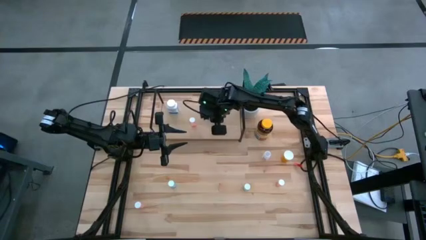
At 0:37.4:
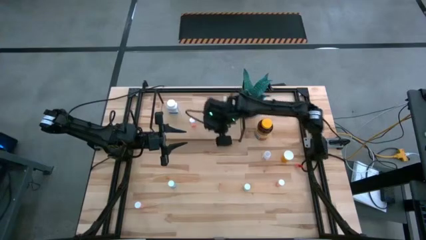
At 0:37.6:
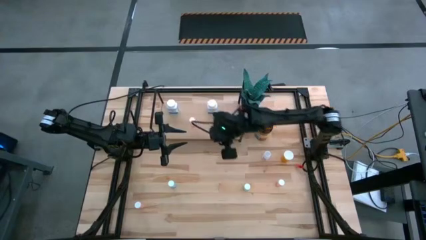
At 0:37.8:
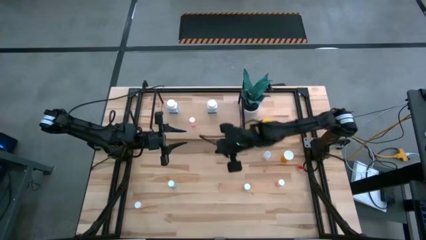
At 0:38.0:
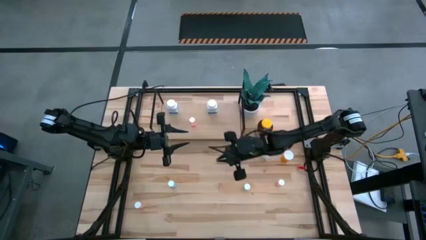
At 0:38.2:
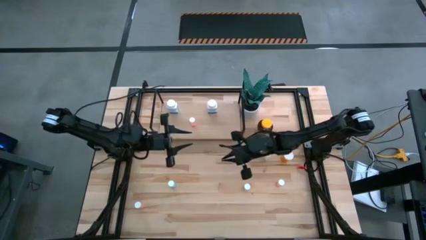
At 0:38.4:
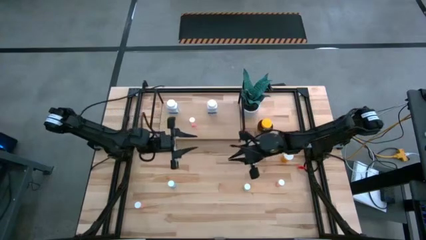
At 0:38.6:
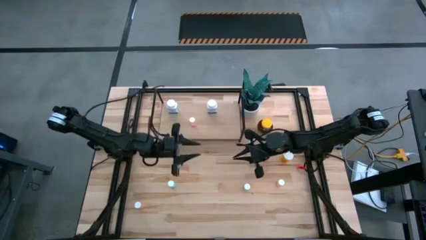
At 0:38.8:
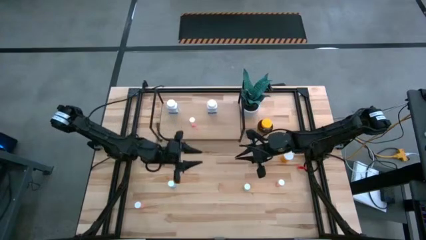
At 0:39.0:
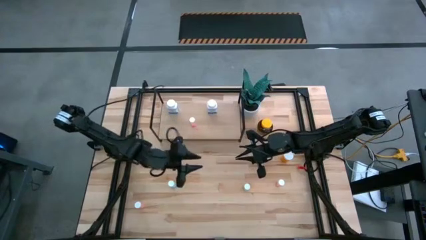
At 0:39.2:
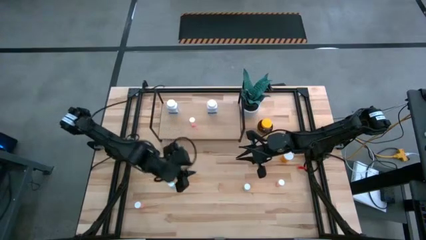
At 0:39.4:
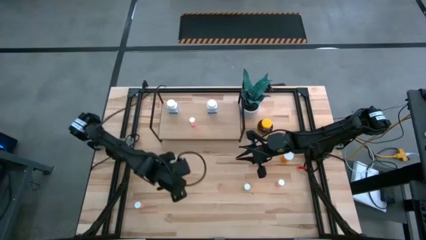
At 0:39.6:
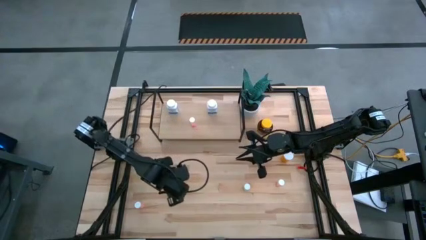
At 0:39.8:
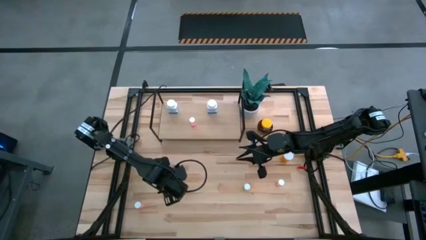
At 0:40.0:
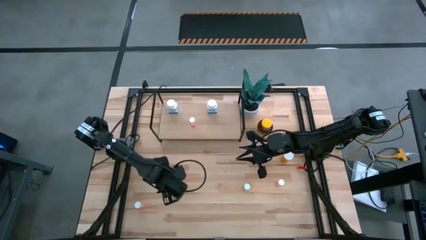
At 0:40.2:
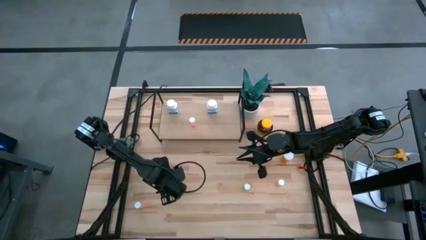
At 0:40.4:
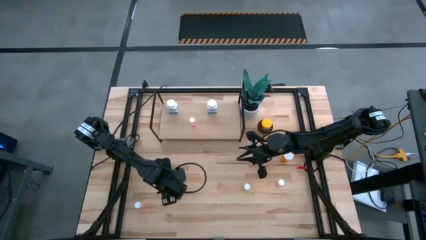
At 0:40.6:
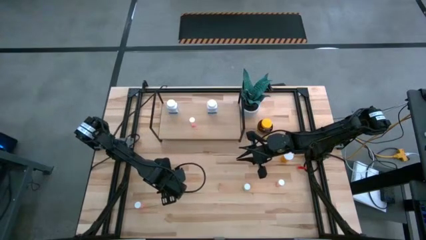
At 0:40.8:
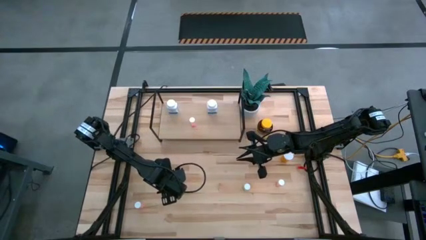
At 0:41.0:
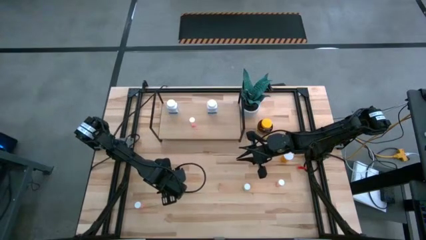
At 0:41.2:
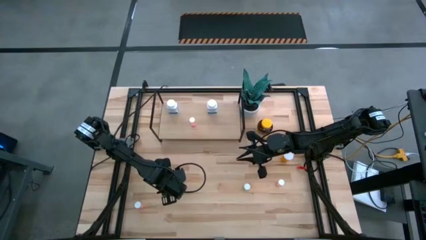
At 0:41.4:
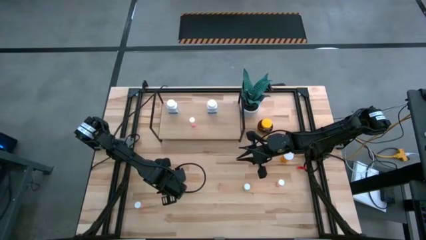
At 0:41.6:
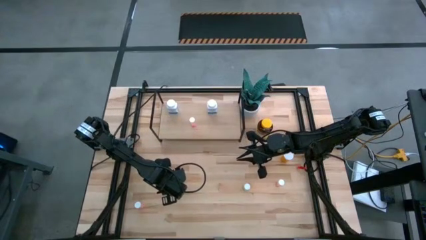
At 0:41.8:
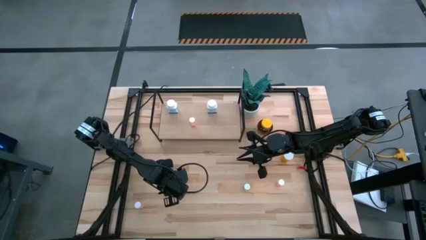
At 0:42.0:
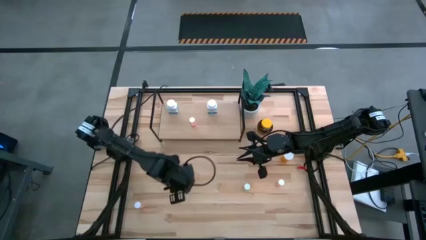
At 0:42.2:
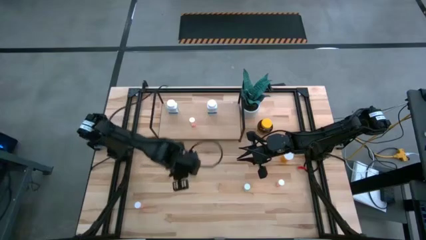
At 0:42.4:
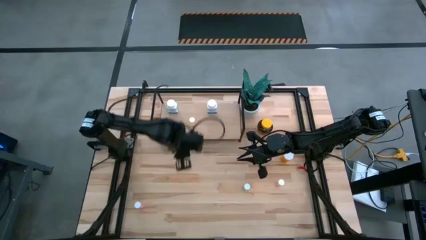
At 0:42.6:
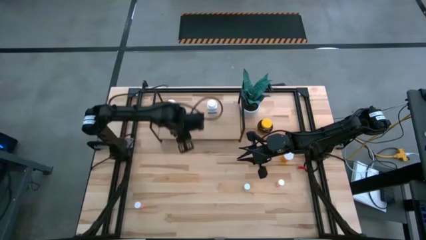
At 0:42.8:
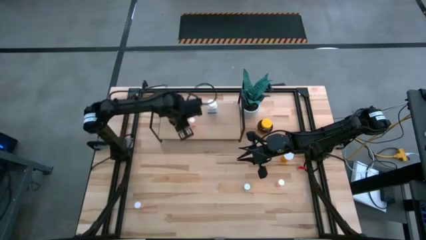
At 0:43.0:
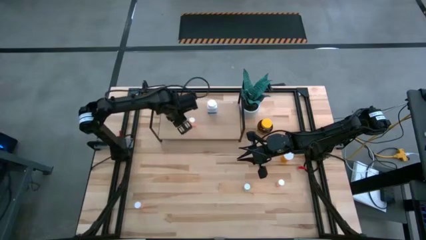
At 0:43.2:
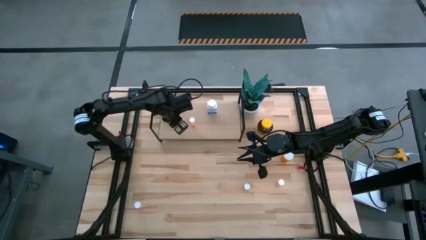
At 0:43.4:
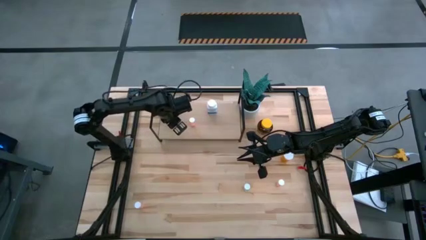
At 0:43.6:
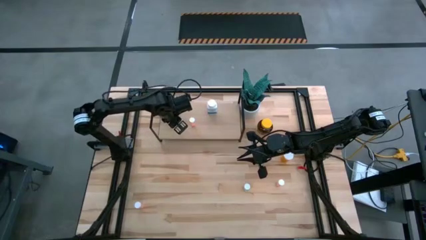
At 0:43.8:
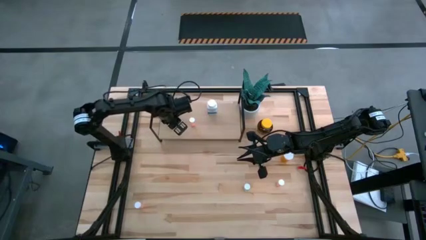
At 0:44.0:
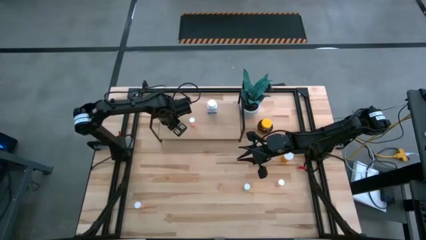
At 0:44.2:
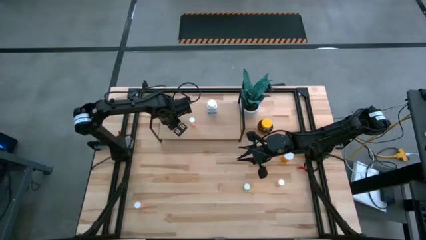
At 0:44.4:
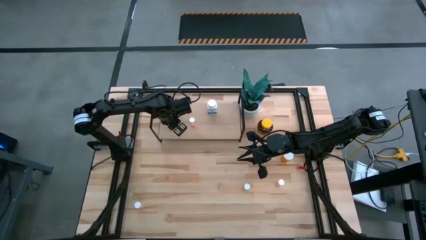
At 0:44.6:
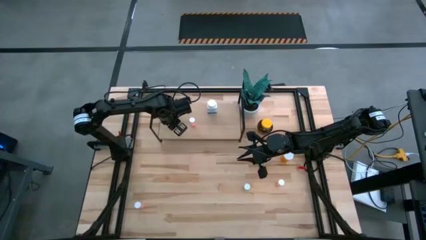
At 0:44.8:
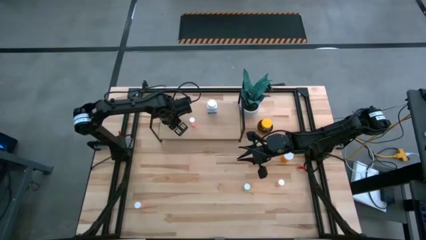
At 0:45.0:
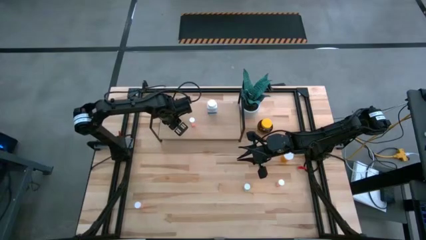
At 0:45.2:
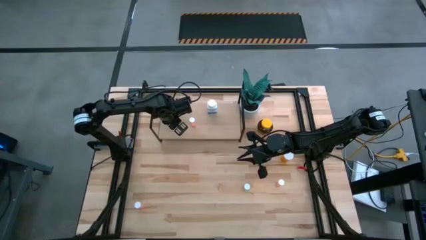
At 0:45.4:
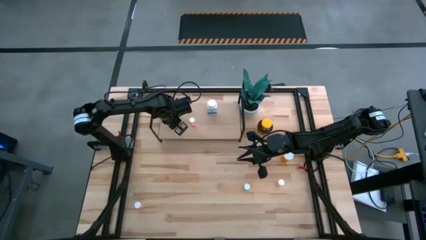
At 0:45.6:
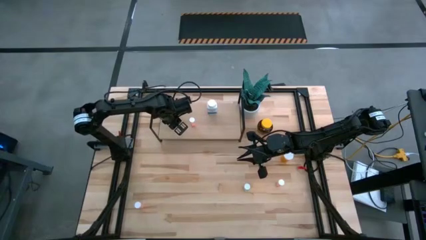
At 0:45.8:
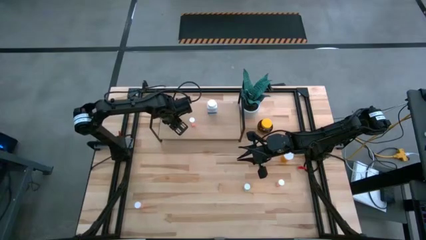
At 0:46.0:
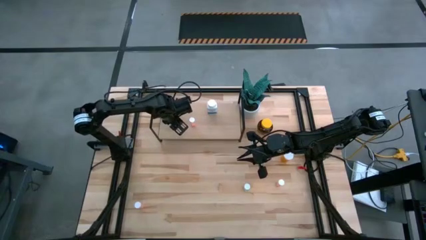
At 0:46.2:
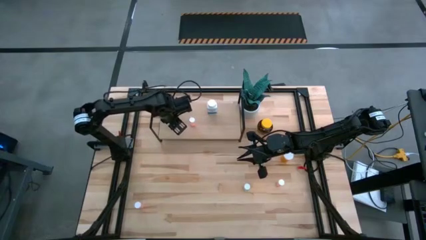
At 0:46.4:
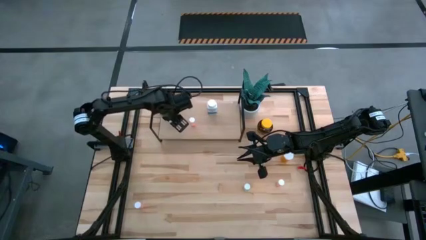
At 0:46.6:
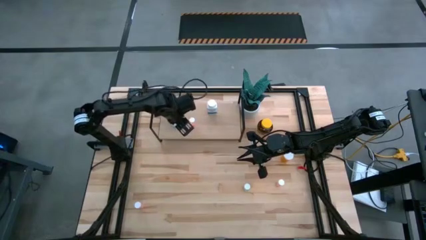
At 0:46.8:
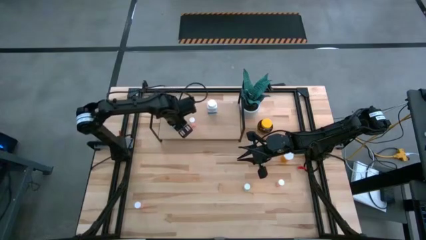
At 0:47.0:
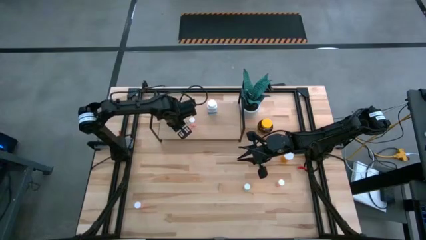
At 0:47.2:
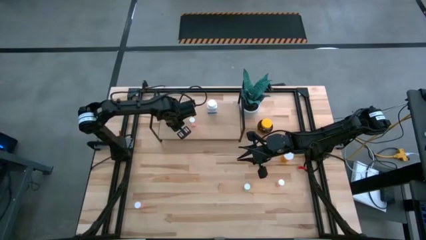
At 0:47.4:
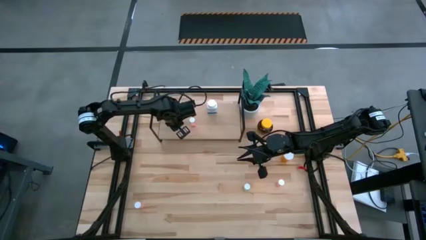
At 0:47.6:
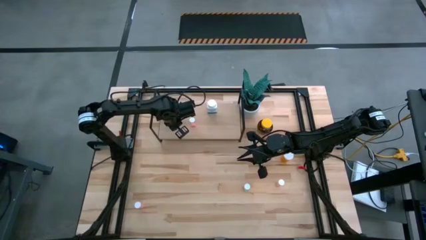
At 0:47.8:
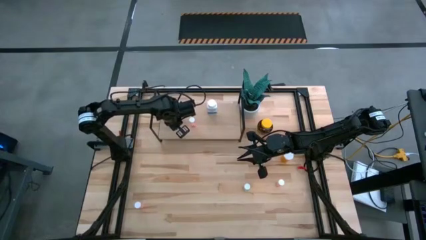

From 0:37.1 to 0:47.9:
Task: Pick and place medicine bottles onto shelf by color
Put the left blue medicine bottle on the shelf

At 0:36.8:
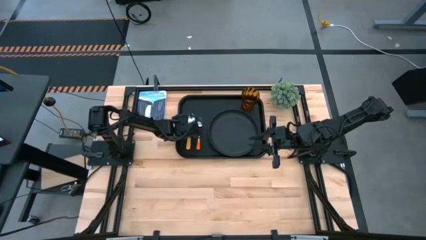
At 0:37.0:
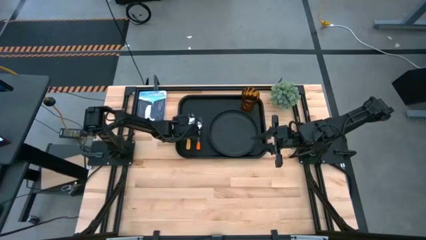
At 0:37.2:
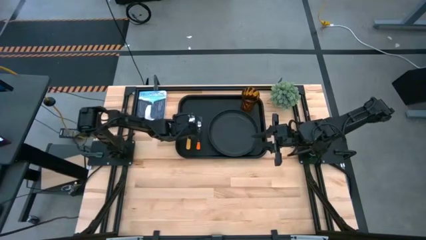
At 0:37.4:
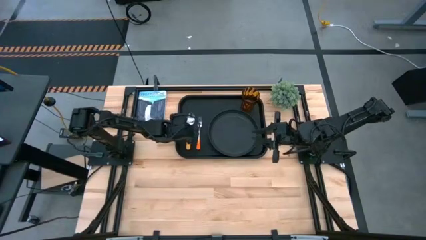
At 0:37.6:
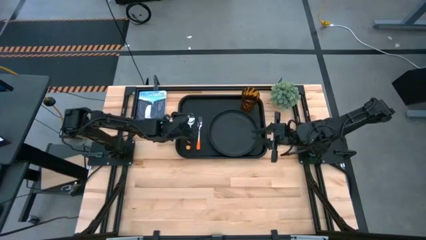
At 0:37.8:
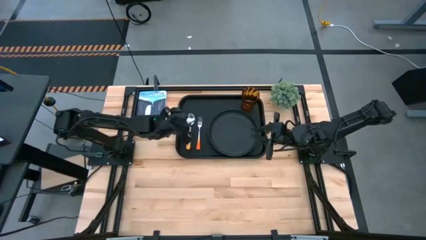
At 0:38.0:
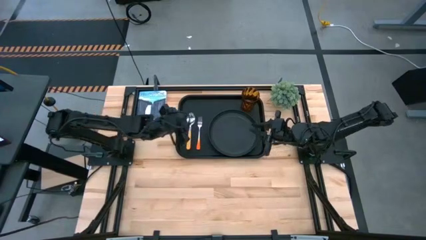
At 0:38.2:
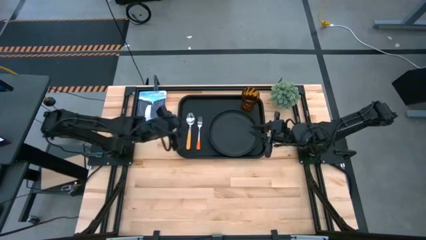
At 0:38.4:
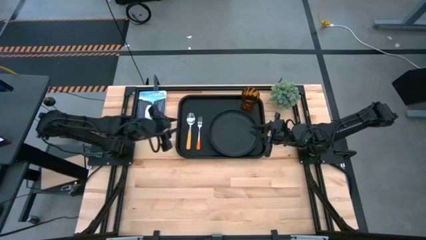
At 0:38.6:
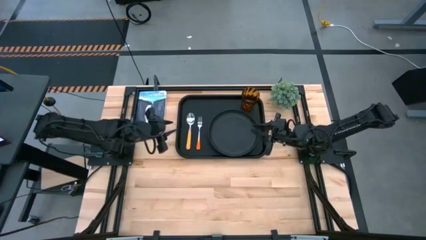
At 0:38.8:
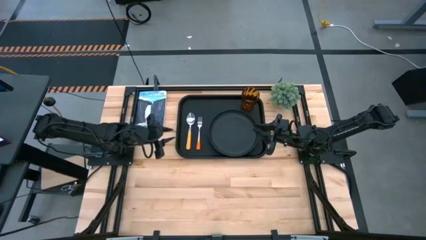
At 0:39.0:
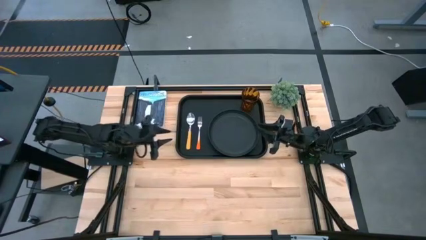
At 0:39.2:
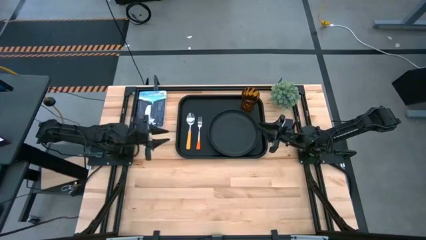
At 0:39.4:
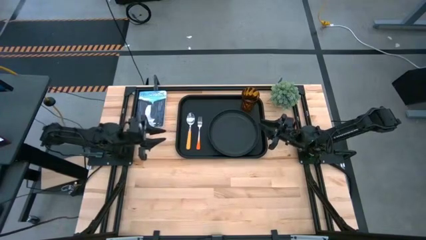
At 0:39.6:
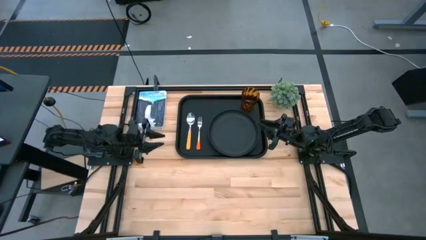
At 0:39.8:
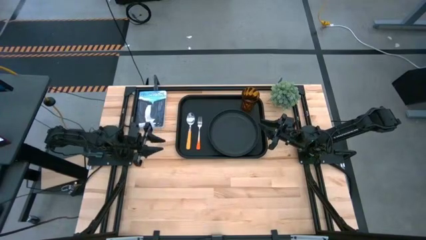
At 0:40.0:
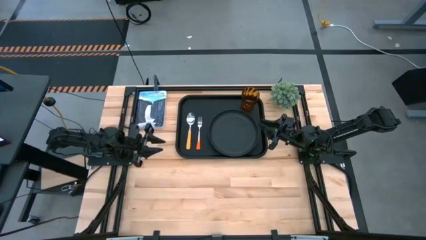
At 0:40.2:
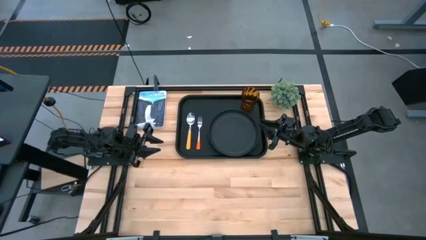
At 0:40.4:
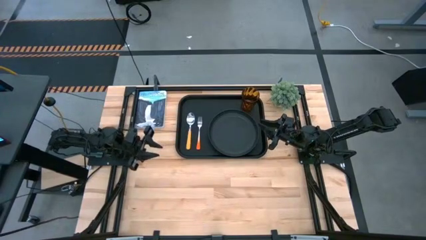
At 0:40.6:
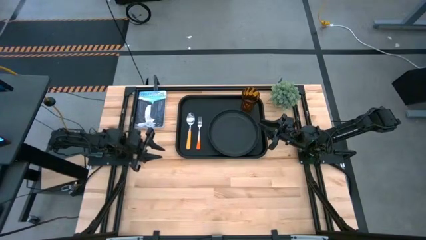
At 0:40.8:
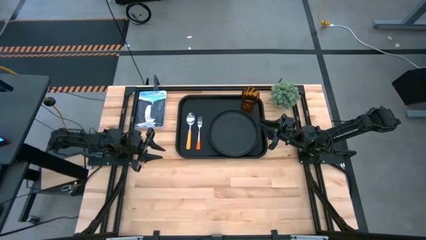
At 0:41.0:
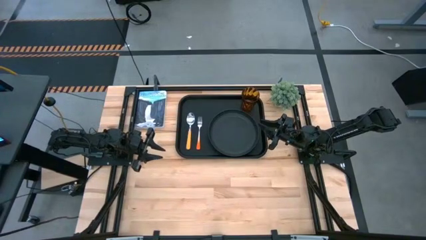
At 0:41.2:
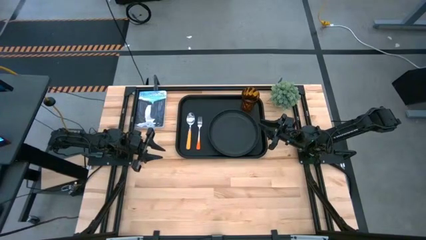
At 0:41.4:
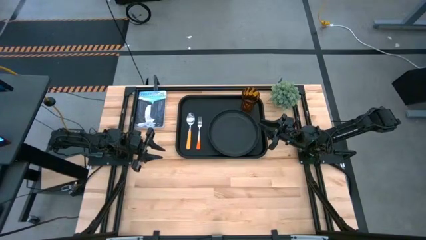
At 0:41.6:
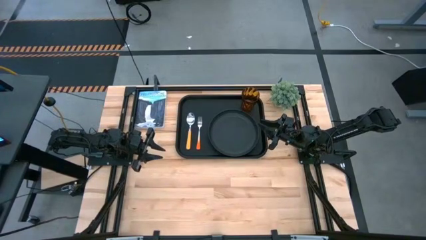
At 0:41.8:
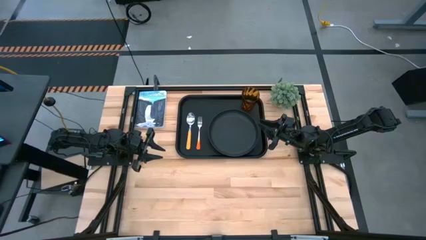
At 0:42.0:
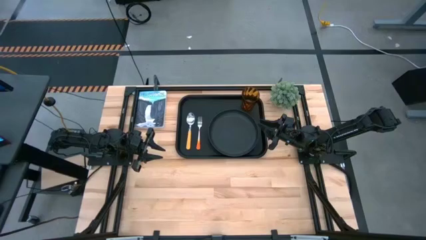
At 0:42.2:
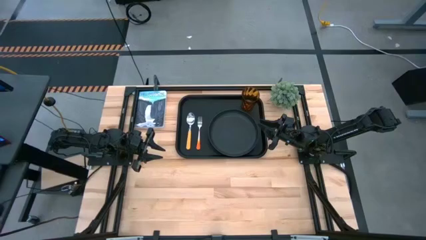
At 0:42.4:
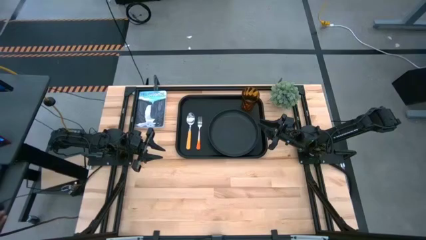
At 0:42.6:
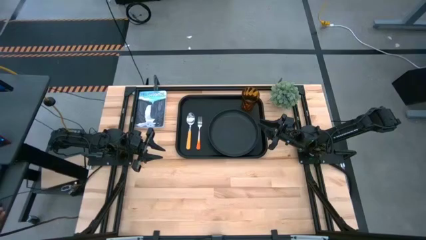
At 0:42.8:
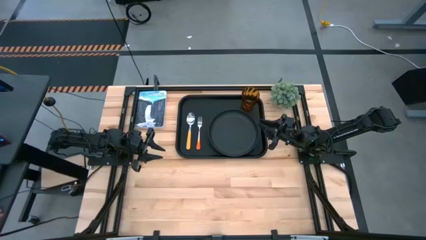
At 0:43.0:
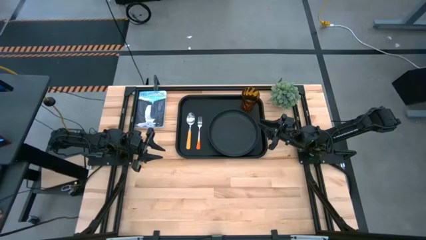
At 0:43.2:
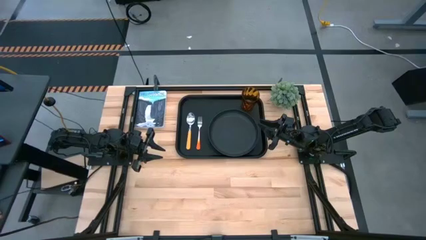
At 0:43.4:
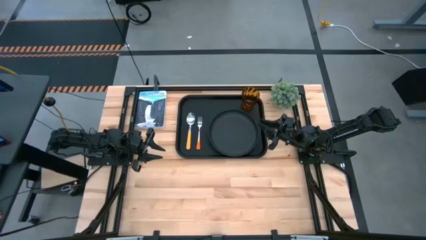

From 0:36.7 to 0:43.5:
Task: Pick and place plate/cup/fork/spoon on tray
Return to home position
